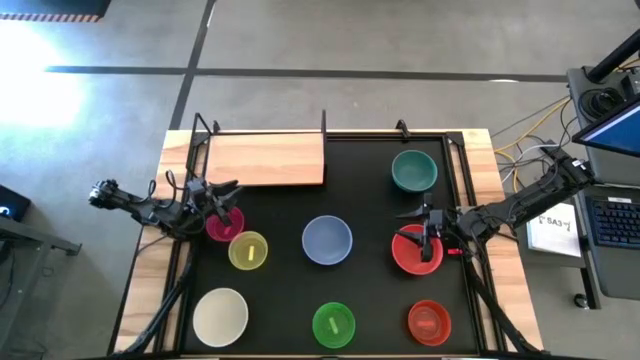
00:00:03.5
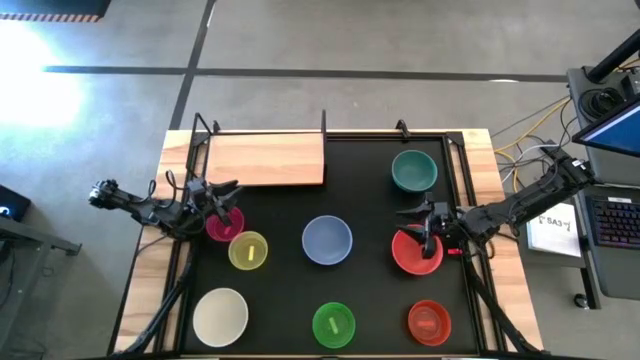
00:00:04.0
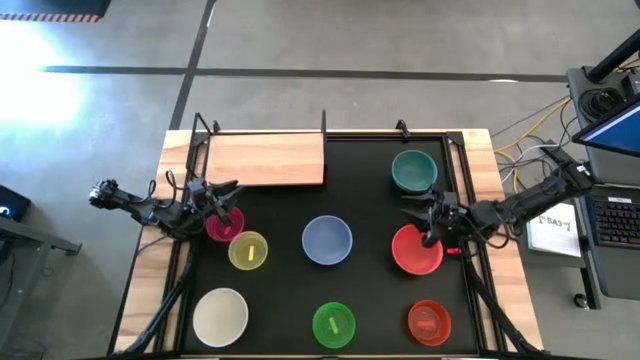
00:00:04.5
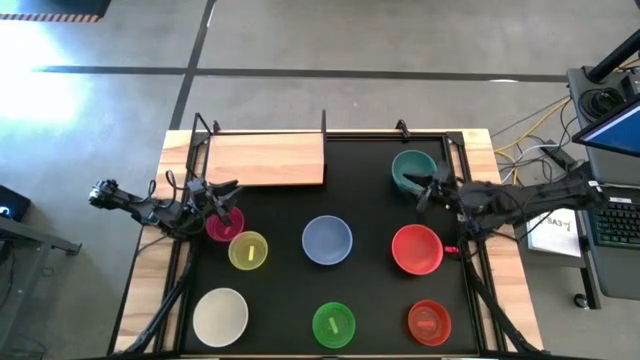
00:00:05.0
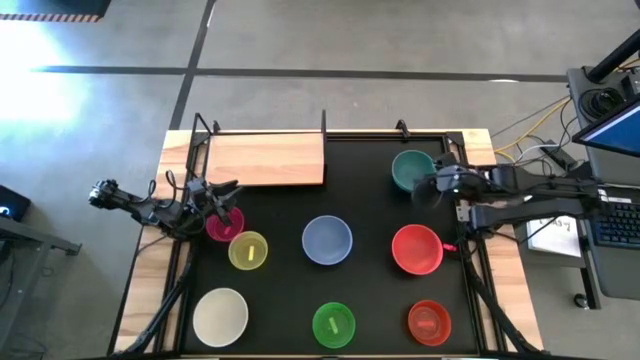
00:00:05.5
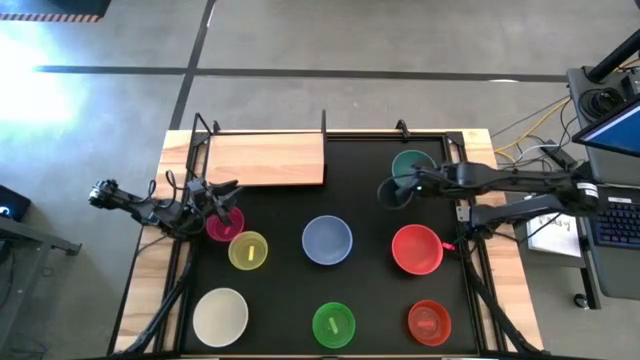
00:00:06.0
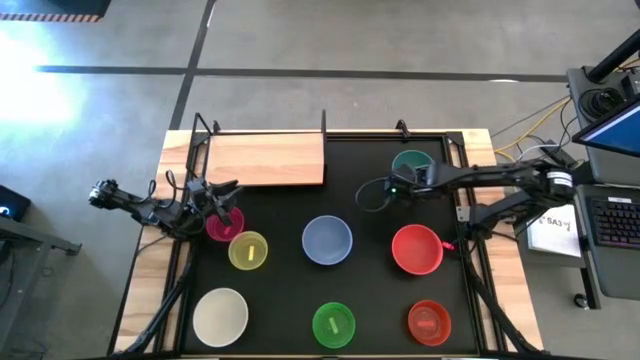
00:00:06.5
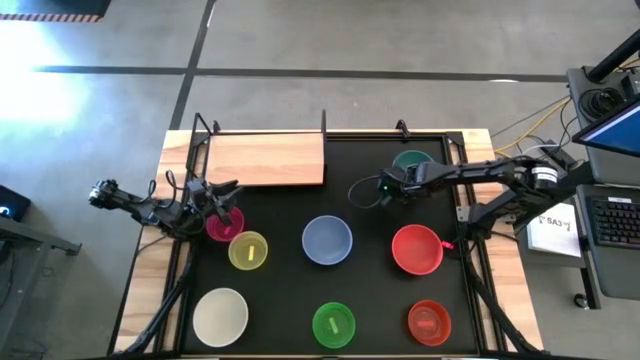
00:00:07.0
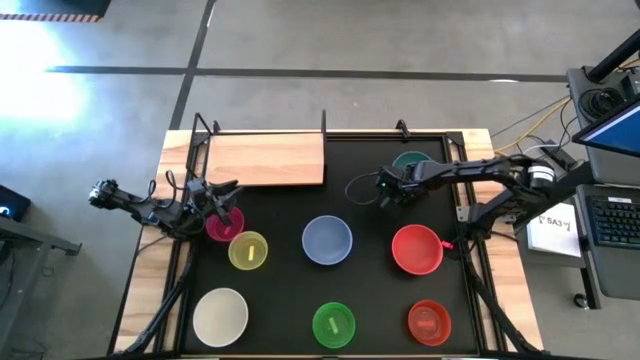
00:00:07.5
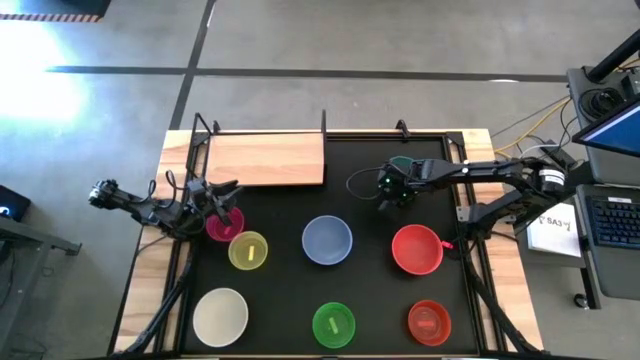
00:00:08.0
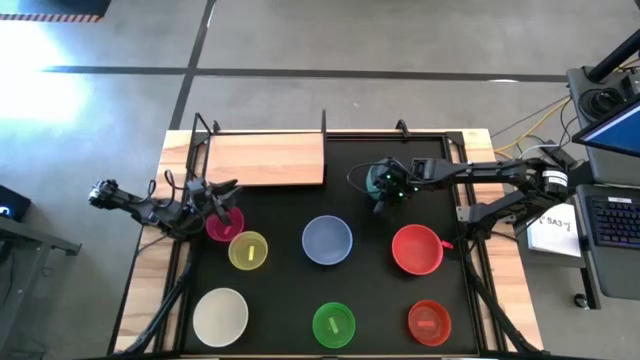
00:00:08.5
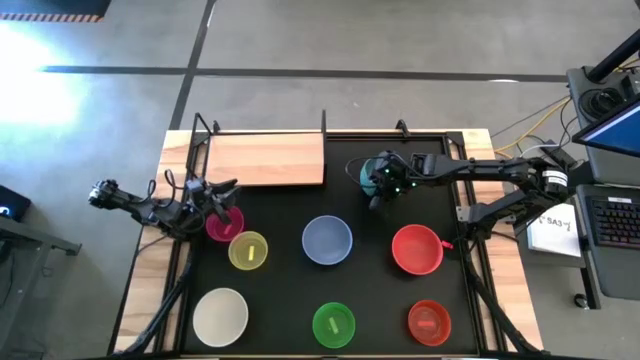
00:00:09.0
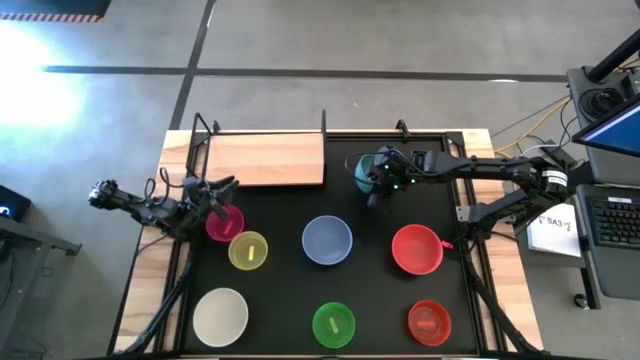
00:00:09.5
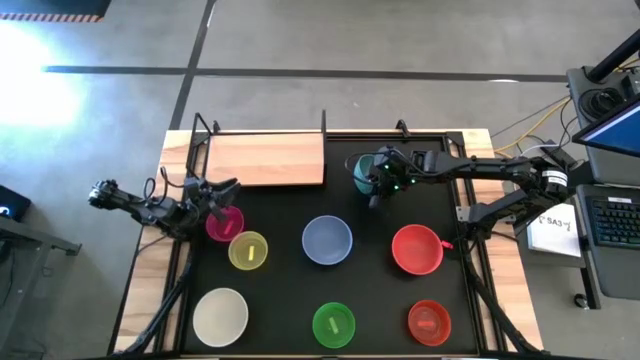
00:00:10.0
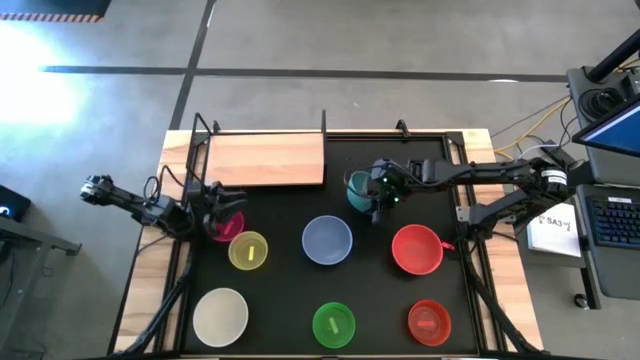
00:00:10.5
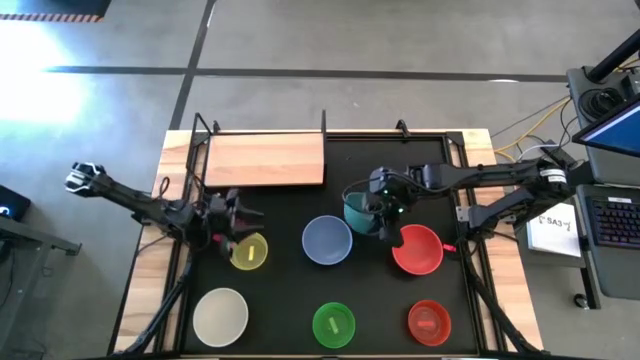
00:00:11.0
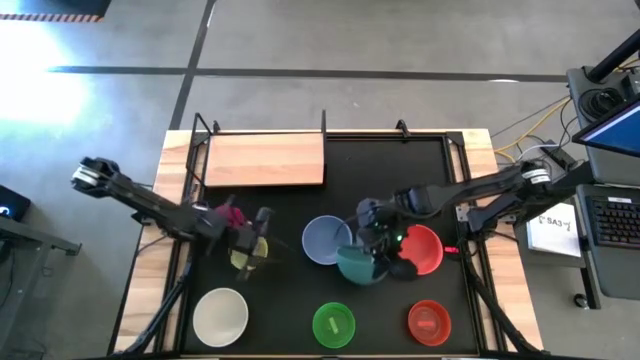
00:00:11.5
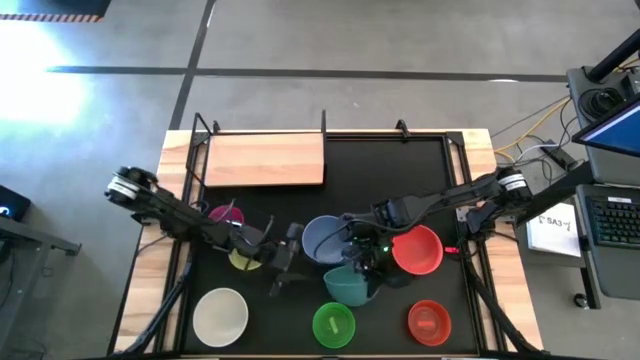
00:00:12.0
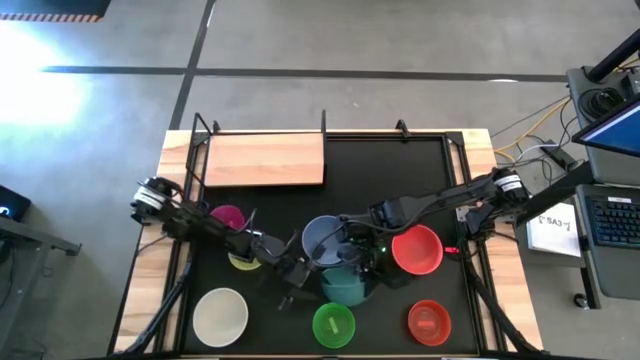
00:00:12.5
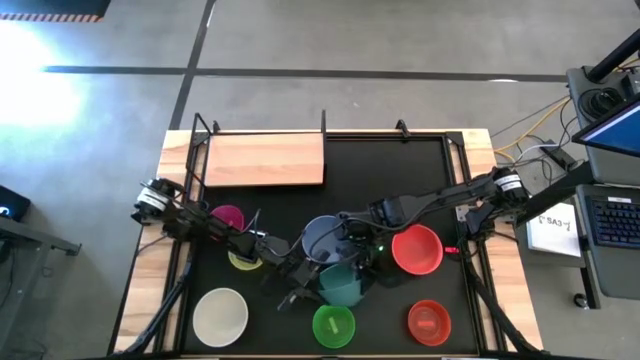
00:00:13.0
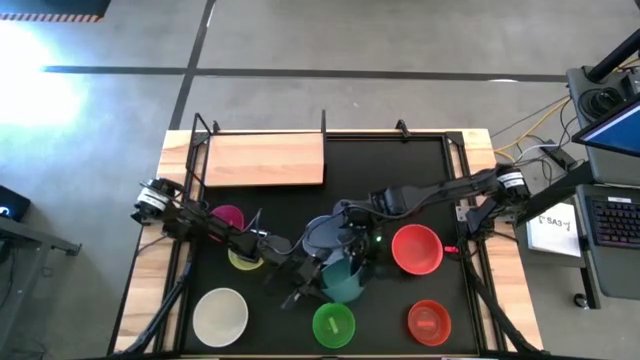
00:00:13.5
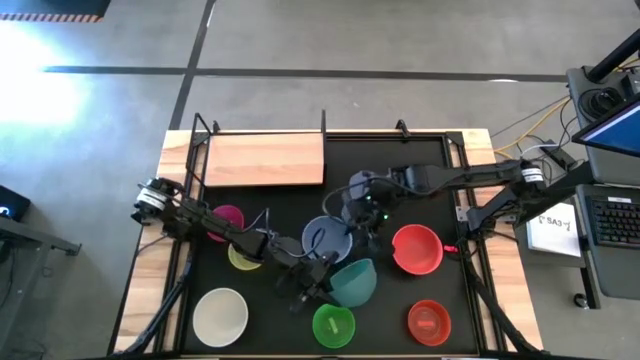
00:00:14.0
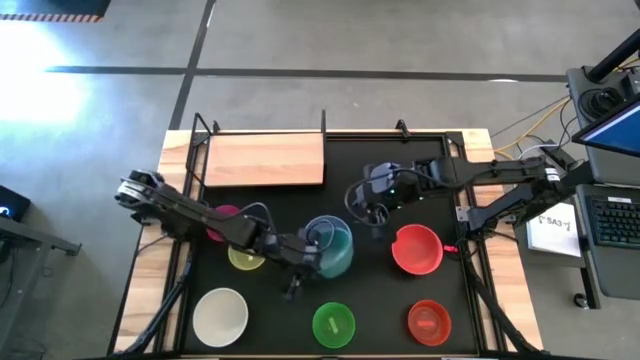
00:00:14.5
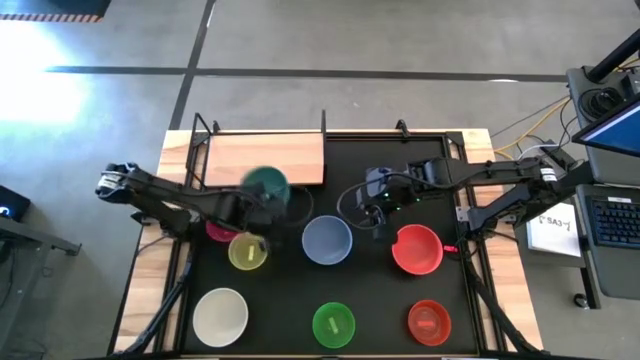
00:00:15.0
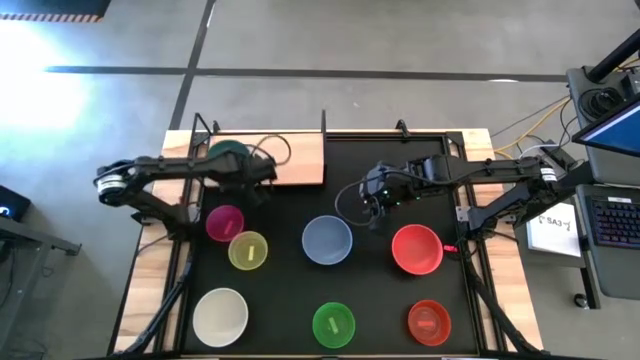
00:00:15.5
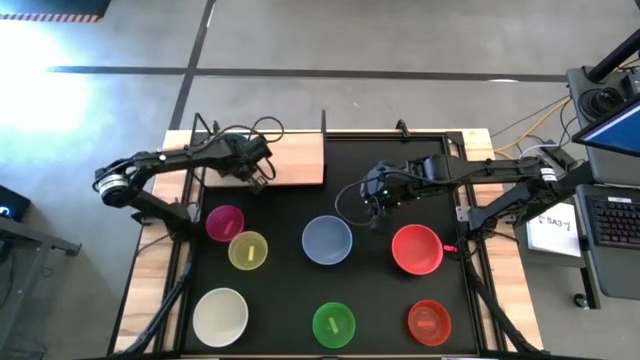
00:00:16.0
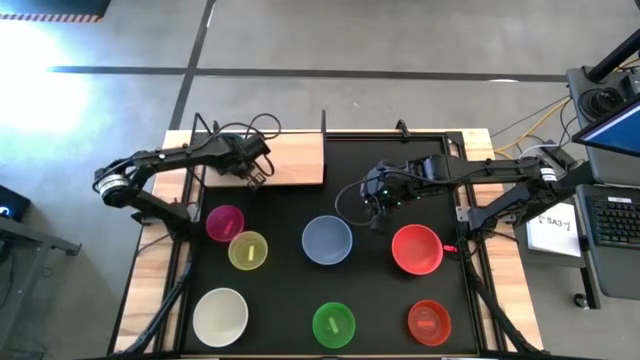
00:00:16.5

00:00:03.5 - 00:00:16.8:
Task: Place and stack bowls onto a shelf
Put the dark green bowl on the shelf

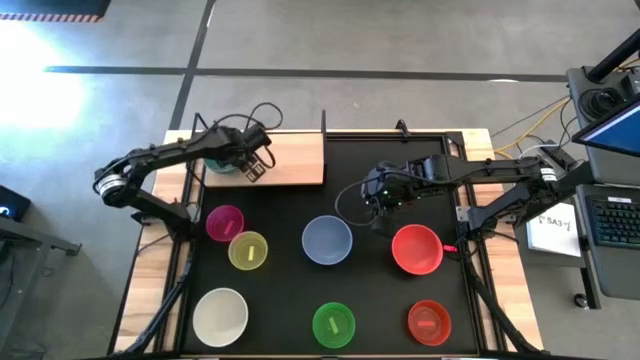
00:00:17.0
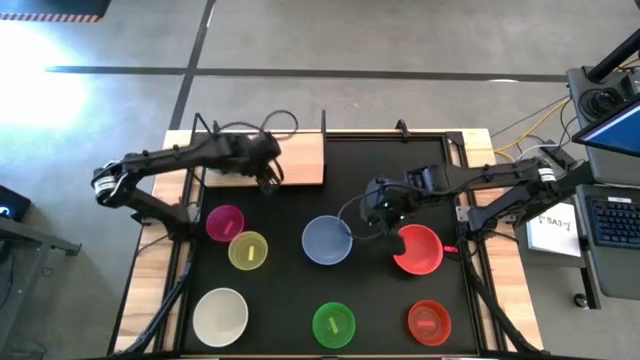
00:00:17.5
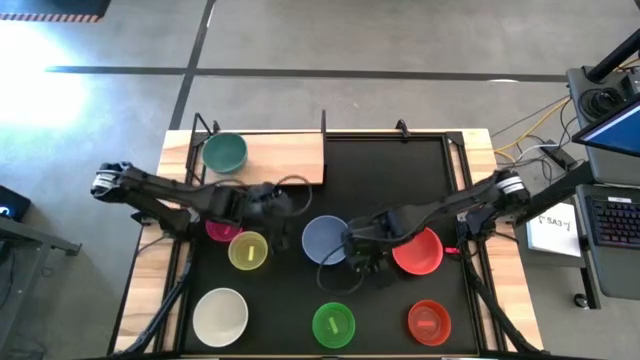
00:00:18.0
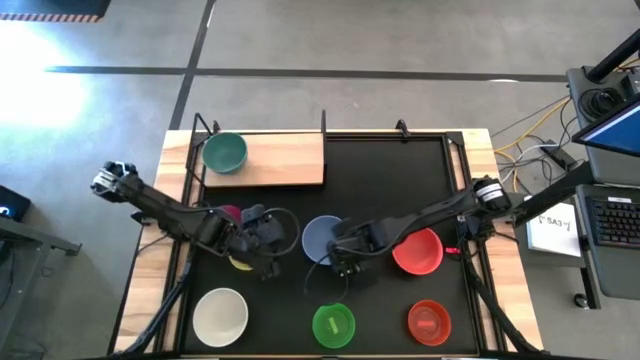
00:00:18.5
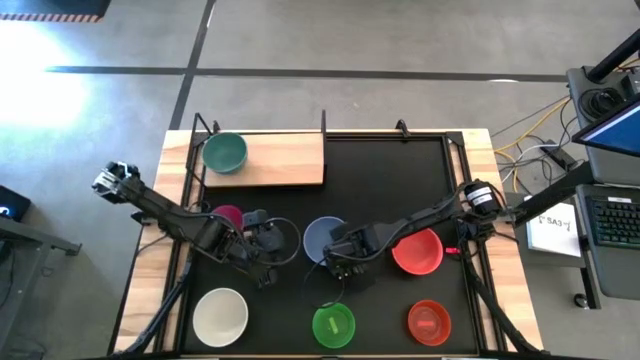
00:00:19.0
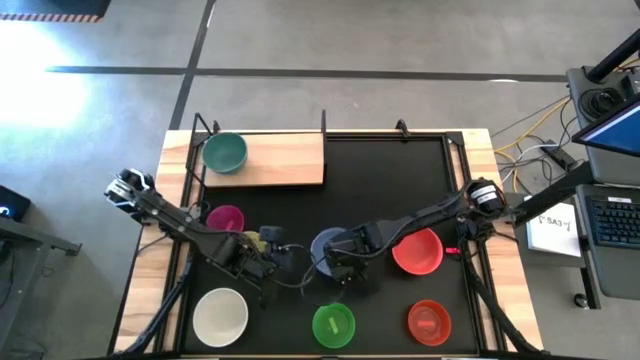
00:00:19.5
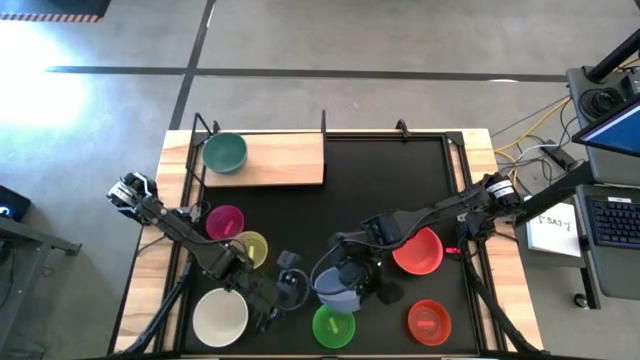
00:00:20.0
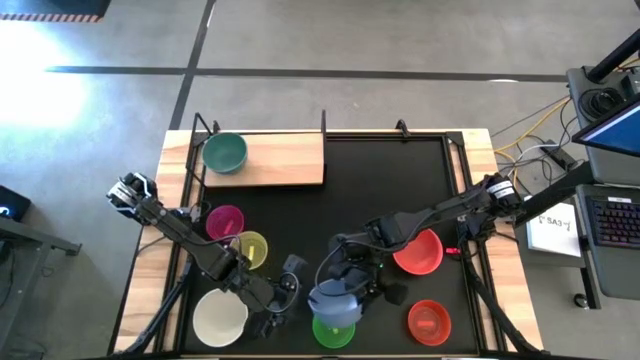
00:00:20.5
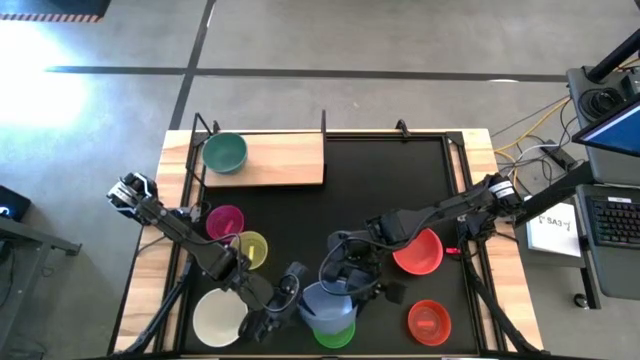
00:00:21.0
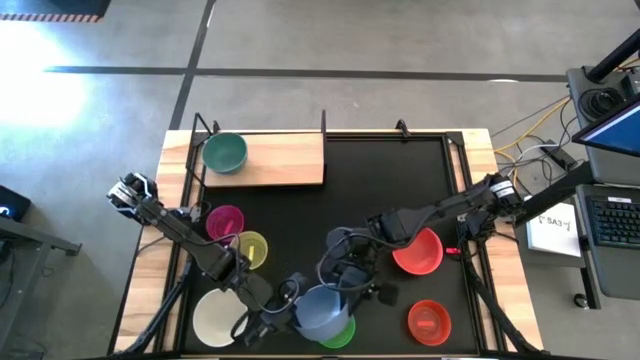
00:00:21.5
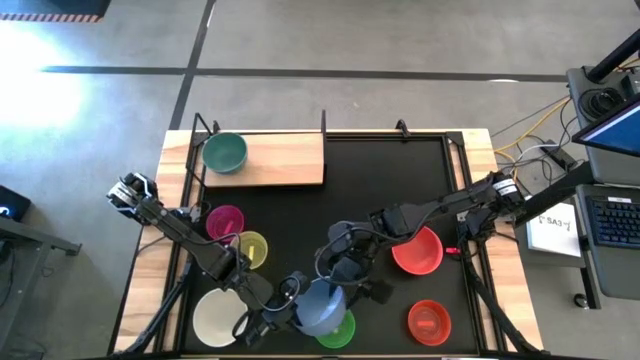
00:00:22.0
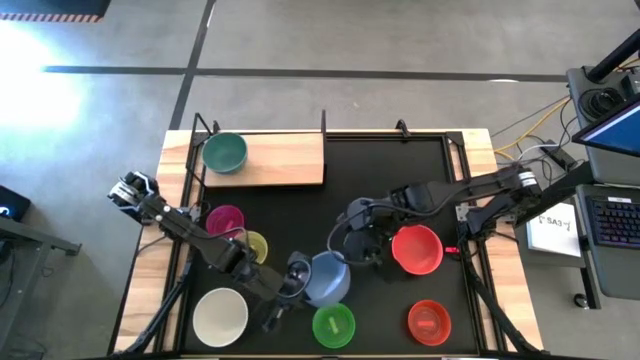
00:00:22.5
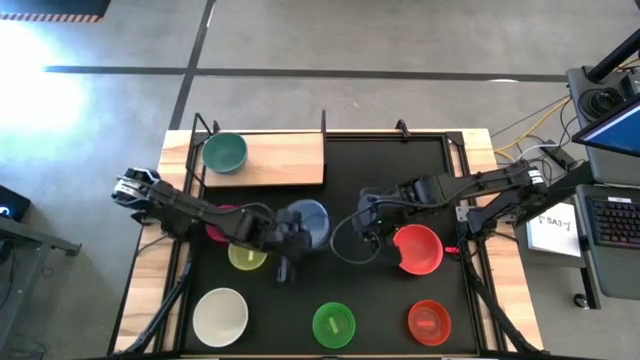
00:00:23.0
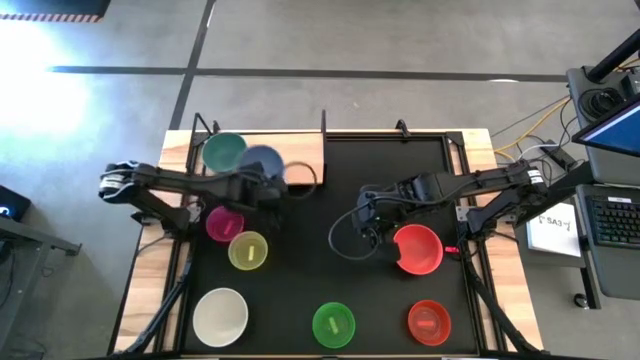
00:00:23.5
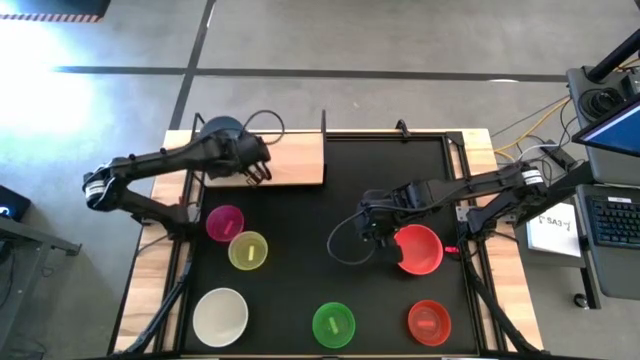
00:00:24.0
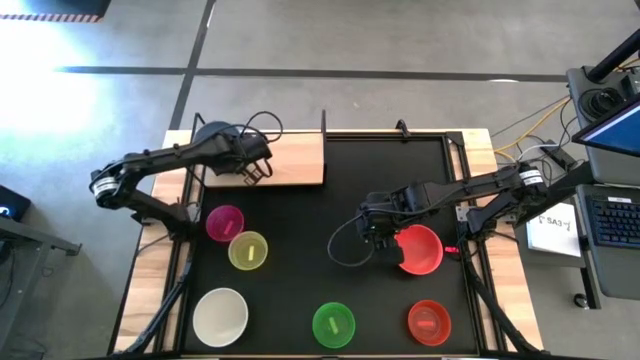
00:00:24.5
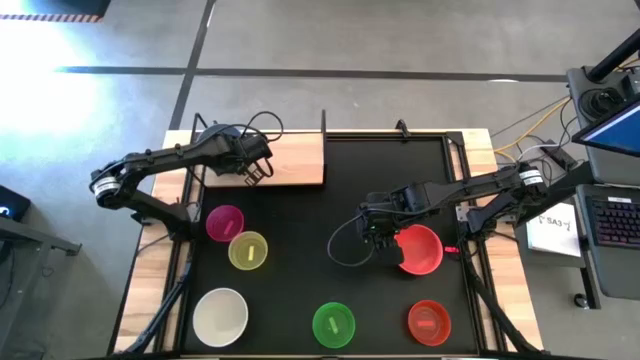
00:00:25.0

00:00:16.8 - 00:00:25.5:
Stack the blue bowl on the dark green bowl on the shelf
